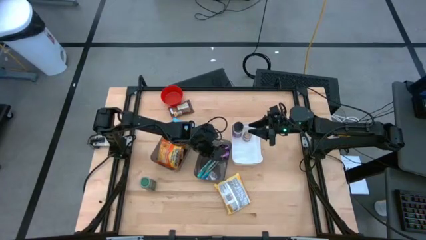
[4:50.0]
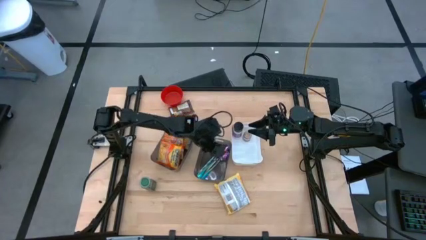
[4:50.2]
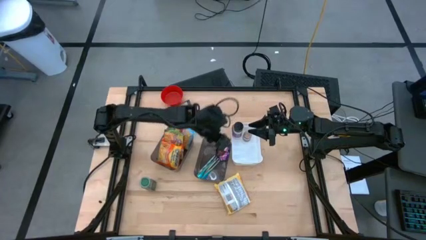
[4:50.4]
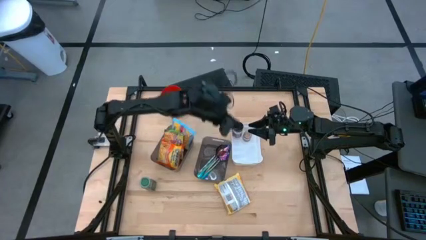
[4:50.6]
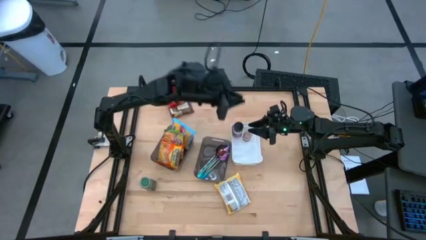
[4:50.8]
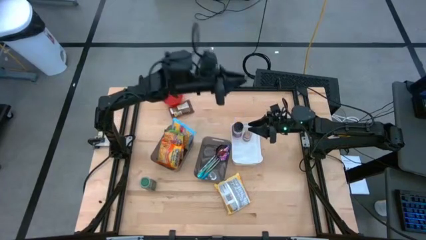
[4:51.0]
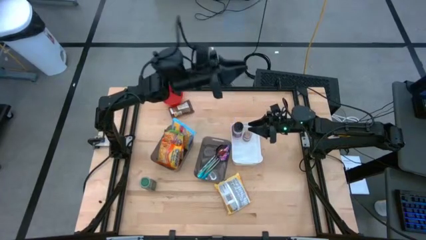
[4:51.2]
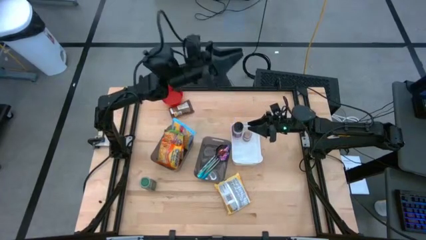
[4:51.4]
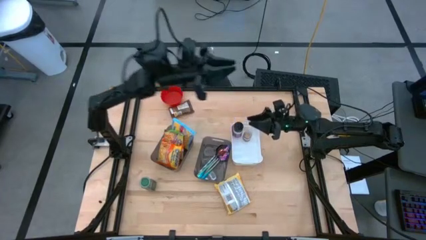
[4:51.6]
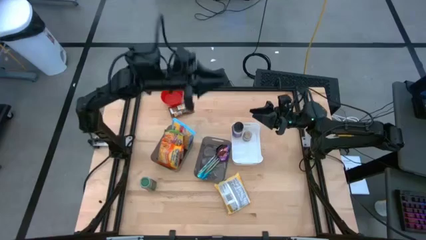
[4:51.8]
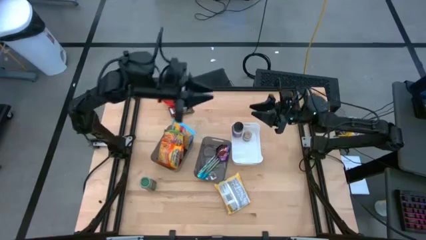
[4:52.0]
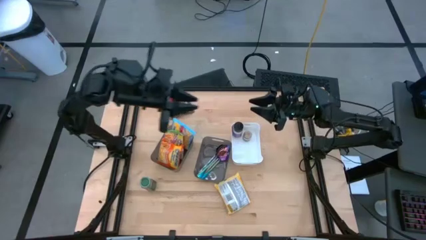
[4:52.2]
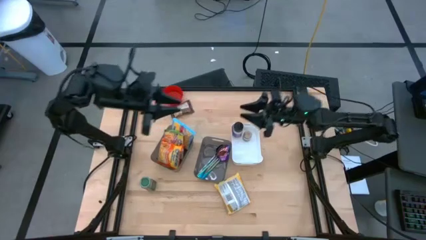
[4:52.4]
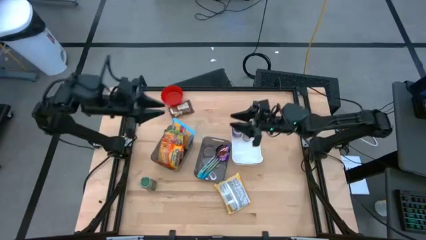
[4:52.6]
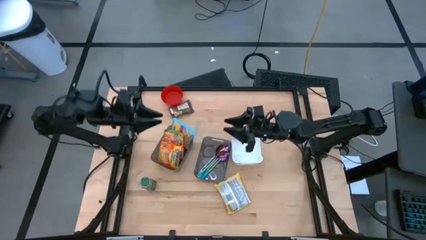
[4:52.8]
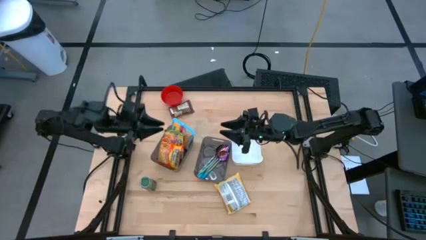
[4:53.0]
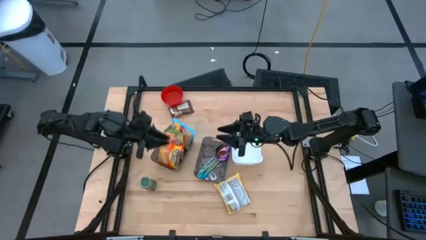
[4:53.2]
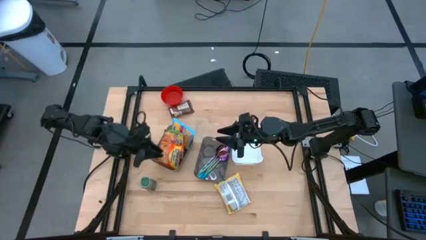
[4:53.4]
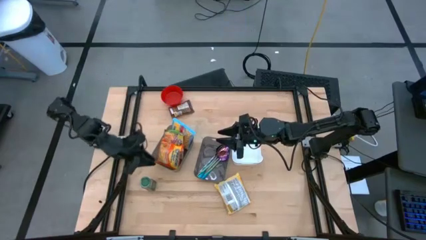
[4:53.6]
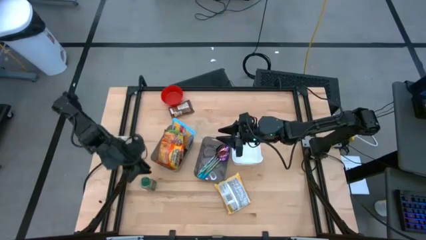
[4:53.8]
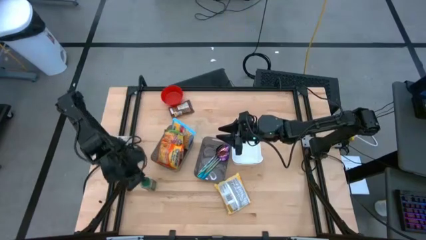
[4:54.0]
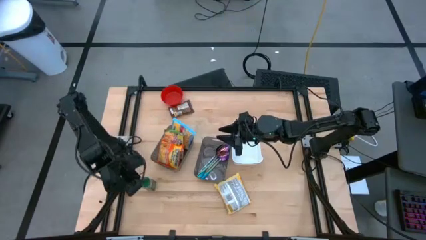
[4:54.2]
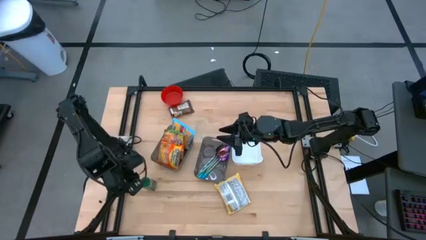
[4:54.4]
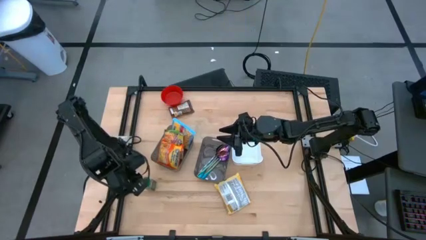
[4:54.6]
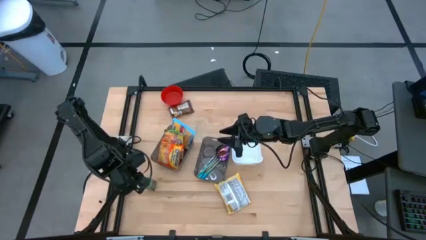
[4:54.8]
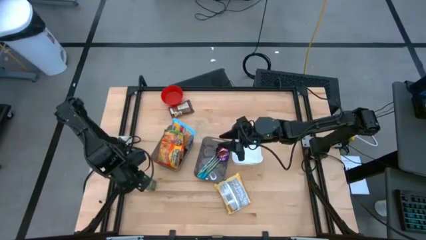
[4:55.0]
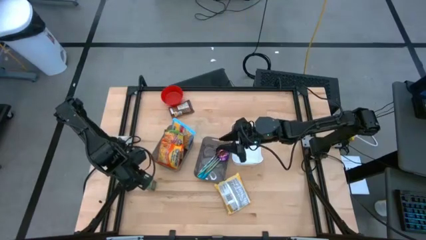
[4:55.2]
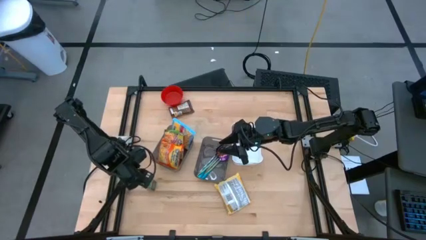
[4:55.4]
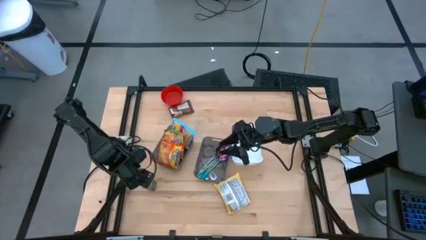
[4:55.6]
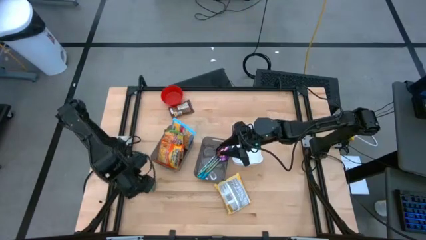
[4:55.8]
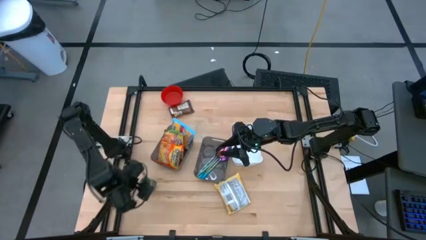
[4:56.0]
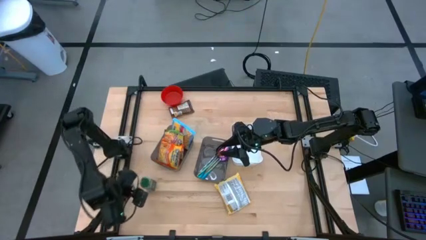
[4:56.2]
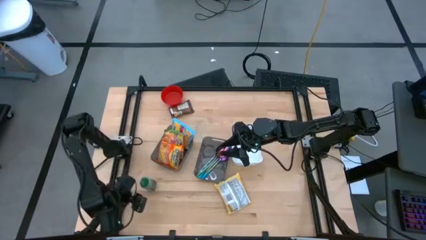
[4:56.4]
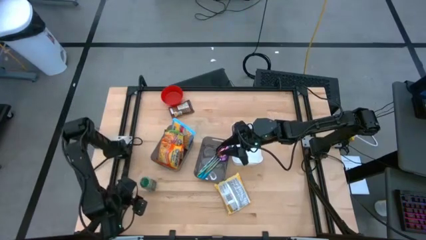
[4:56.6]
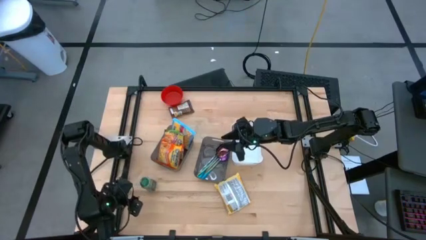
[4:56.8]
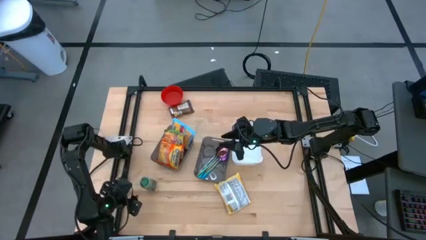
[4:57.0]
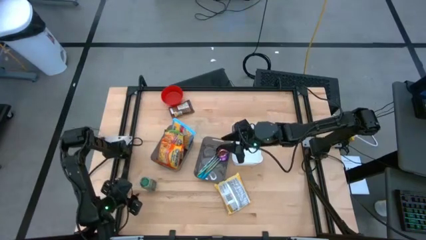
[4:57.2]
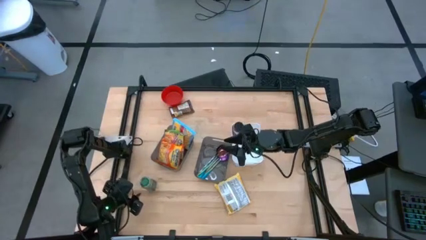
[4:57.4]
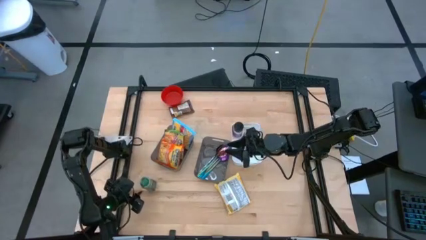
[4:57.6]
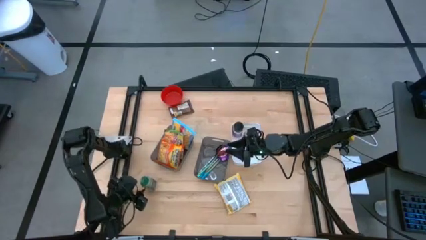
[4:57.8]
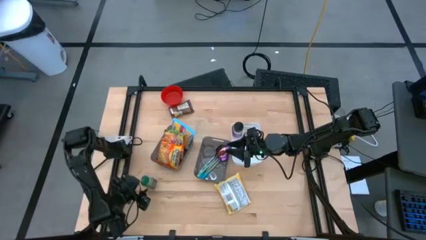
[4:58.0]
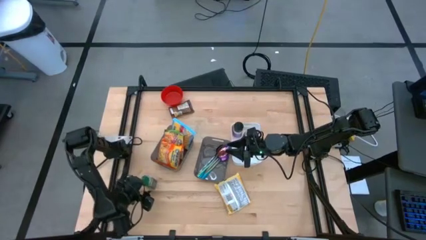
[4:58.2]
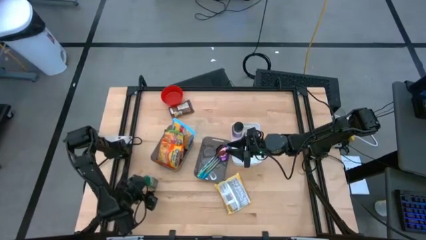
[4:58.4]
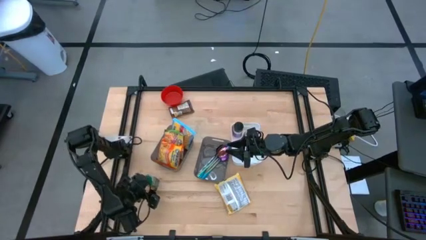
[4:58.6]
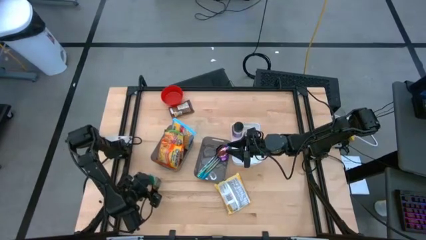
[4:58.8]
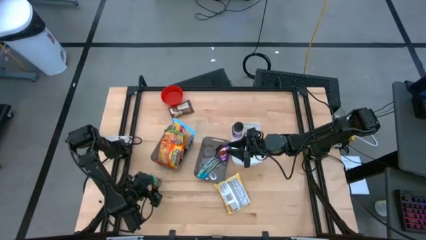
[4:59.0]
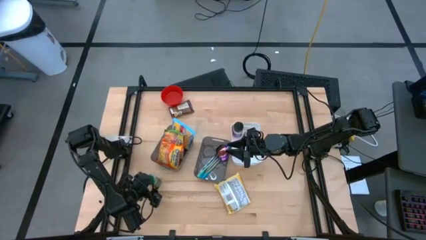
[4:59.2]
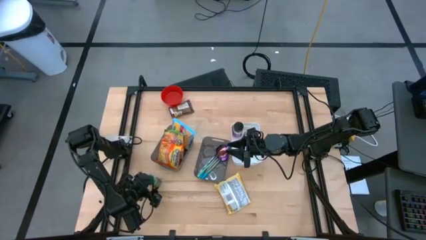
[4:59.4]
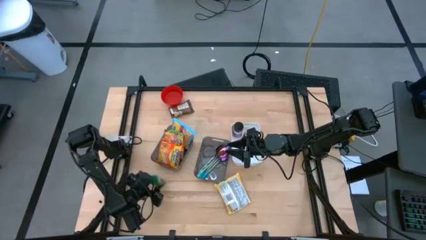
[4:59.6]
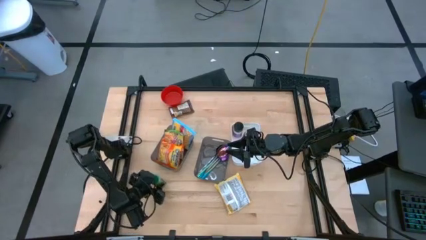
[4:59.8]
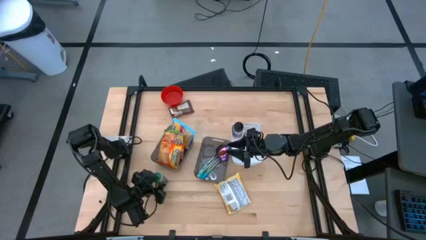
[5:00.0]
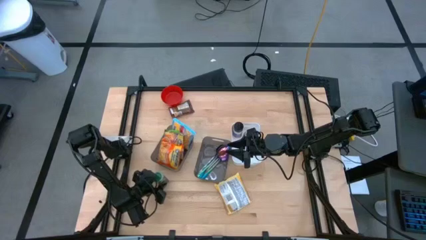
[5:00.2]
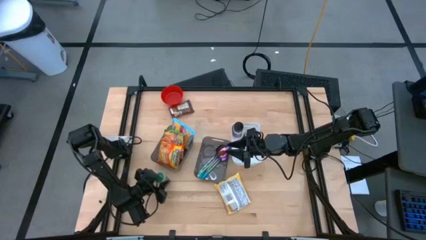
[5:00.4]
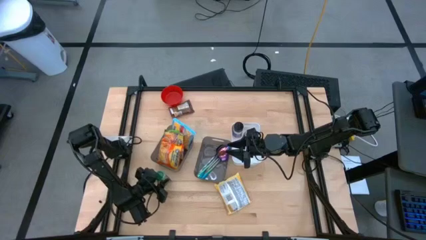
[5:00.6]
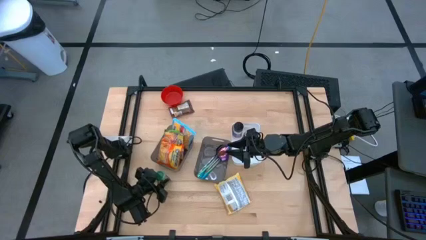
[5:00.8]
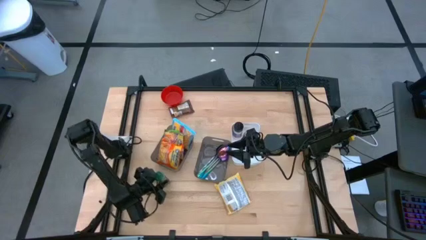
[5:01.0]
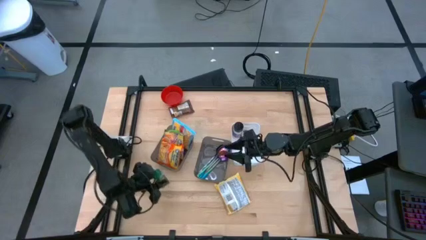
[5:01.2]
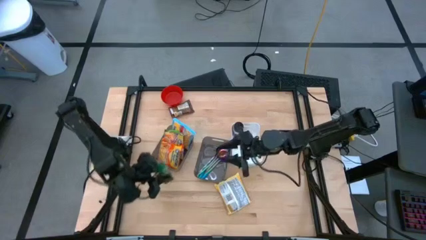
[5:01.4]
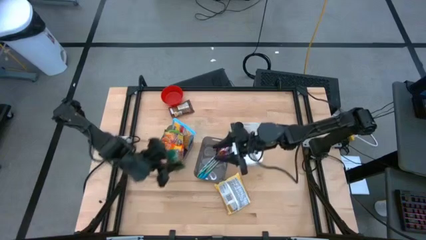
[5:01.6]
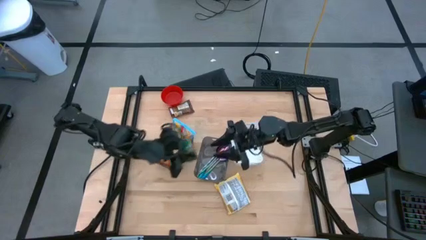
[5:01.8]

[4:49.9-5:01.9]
Task: Pick & Place Food Item
Put the green bottle into the white bin

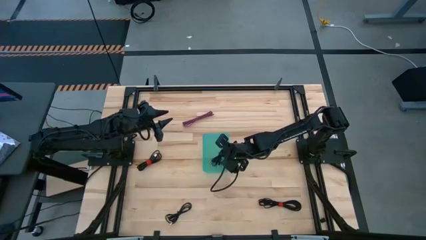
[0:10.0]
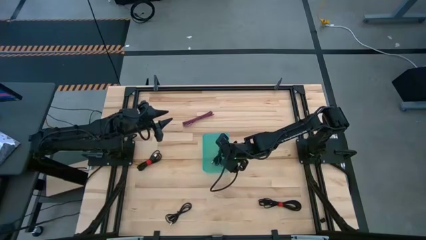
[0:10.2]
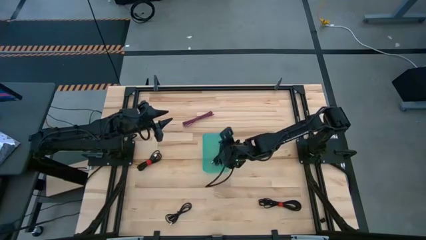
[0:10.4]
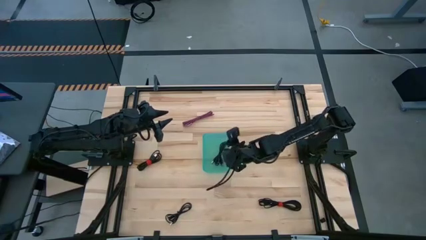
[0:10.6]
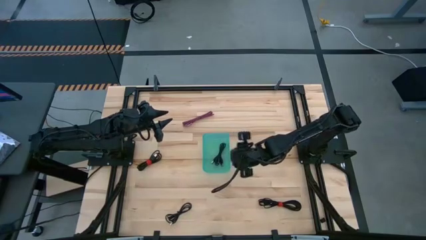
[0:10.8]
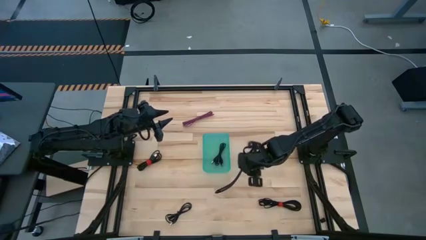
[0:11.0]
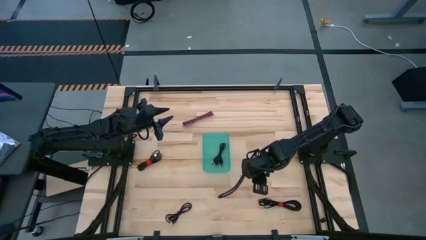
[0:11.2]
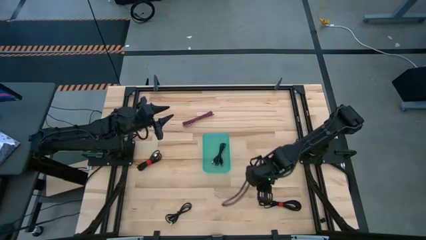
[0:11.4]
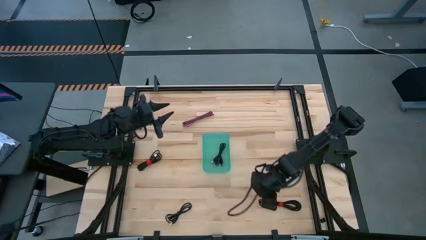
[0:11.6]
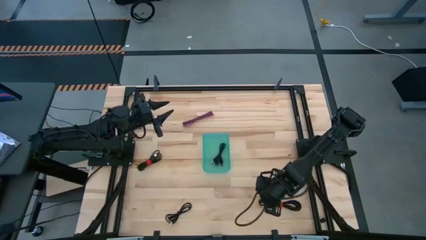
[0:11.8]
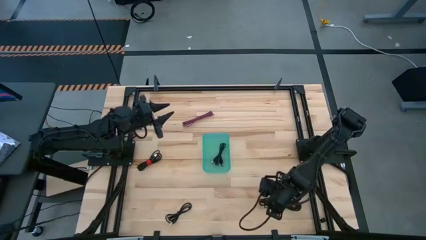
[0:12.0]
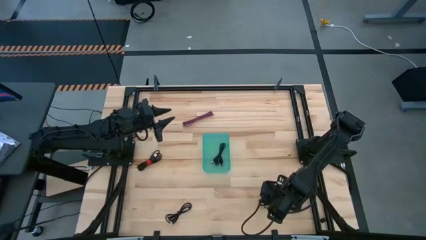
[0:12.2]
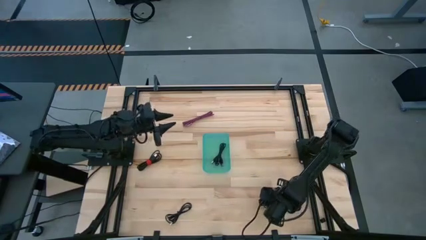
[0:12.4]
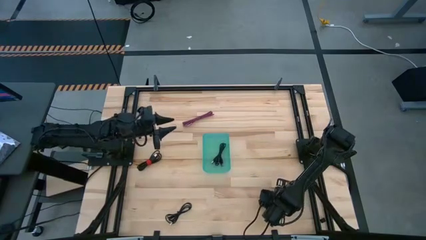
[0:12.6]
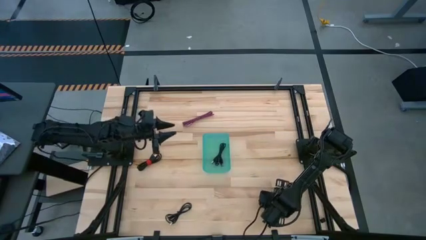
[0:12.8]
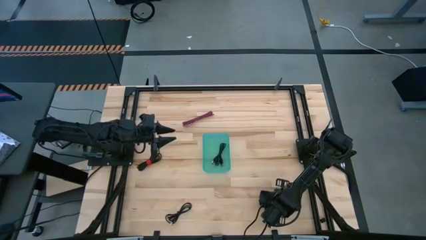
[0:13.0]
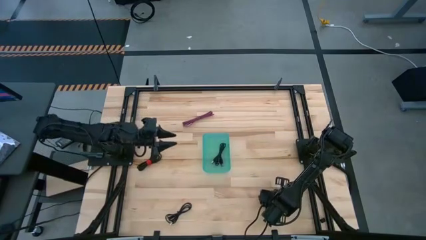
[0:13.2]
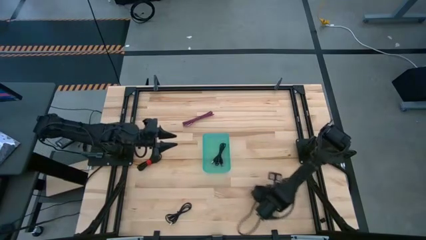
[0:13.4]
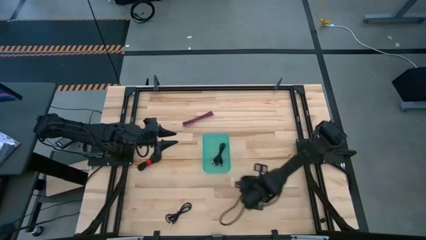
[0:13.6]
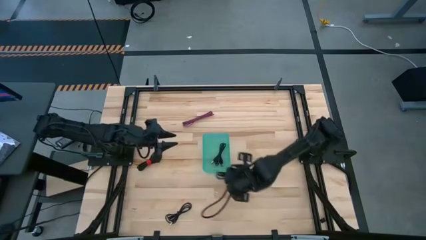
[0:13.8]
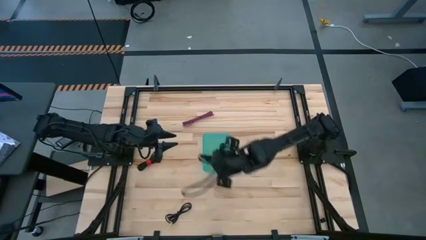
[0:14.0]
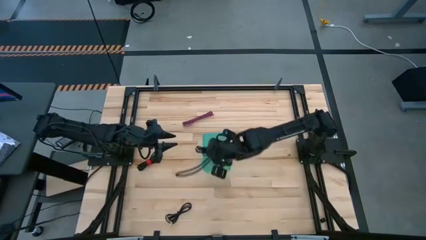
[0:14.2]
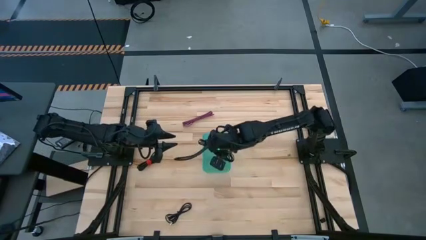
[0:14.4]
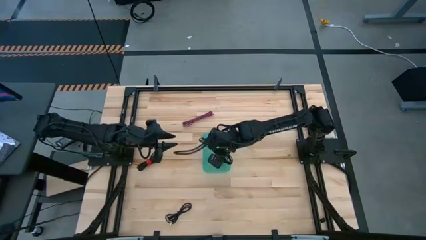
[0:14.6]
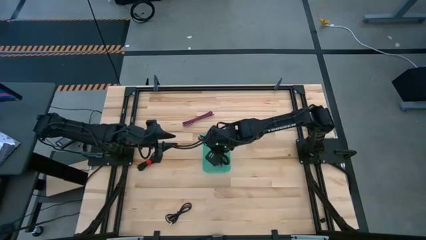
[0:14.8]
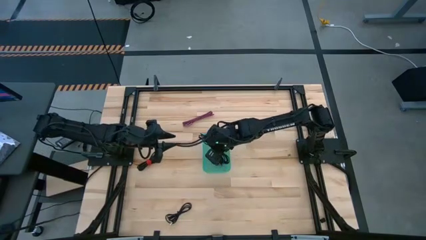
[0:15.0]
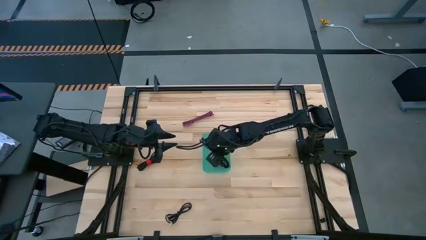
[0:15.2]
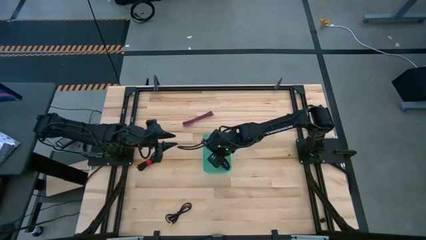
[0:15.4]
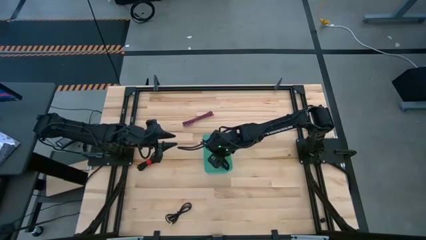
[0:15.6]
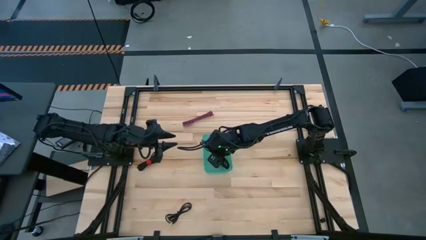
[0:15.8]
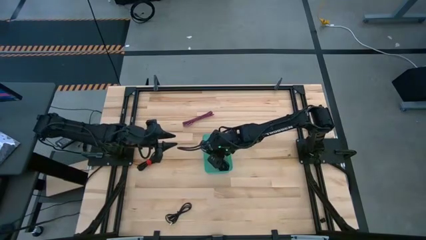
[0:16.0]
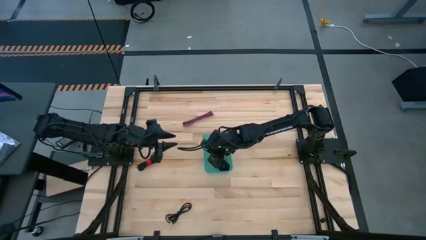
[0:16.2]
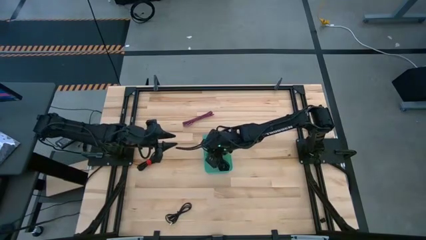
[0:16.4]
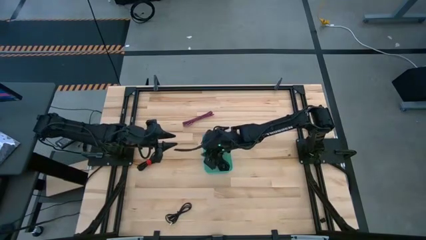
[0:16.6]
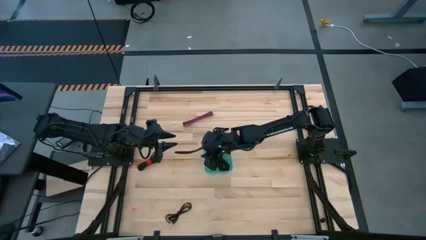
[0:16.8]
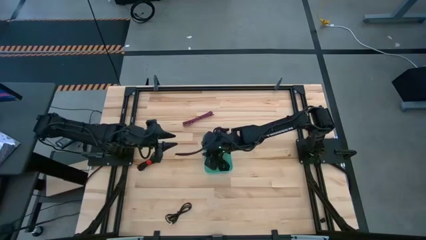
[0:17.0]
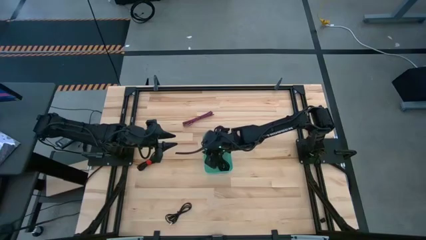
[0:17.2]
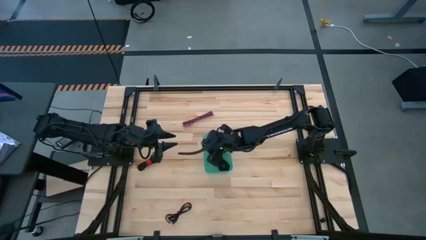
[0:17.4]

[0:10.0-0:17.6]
Task: Pick and place USB-C Cables
Put the bottom right black charger cable into the green bin
